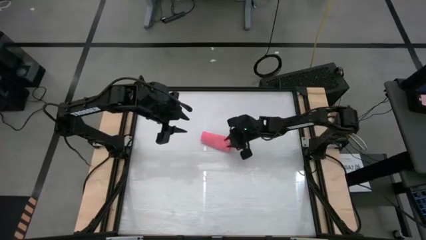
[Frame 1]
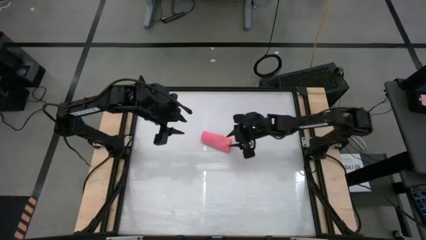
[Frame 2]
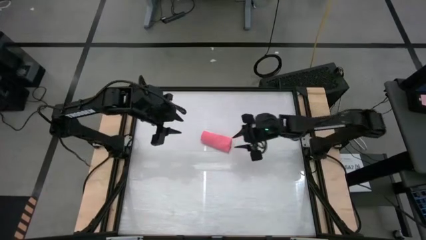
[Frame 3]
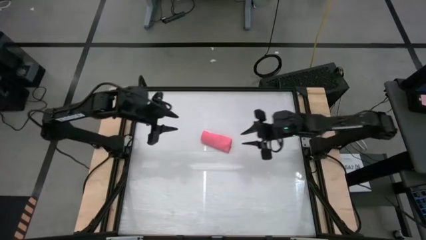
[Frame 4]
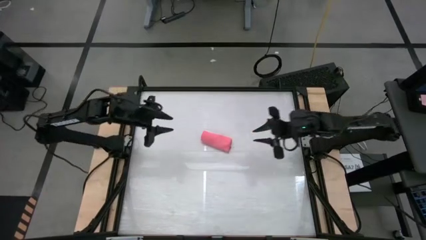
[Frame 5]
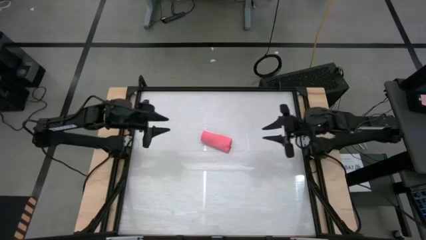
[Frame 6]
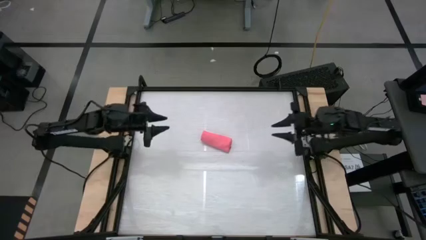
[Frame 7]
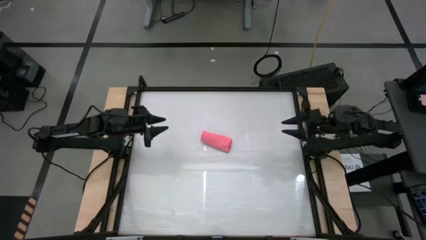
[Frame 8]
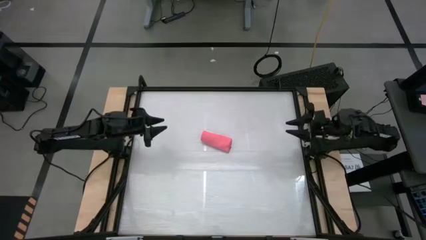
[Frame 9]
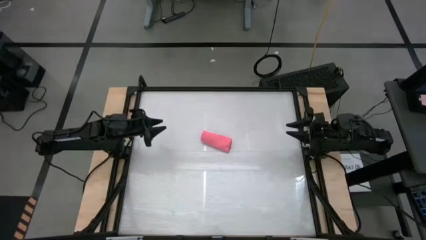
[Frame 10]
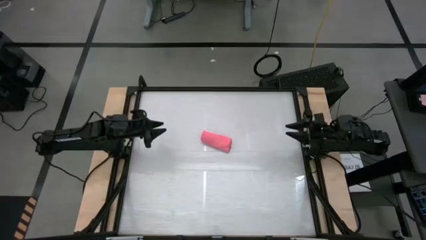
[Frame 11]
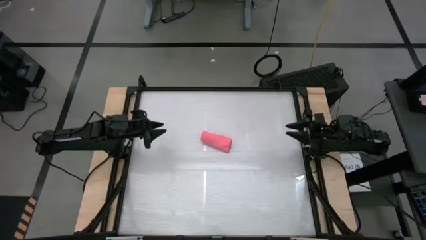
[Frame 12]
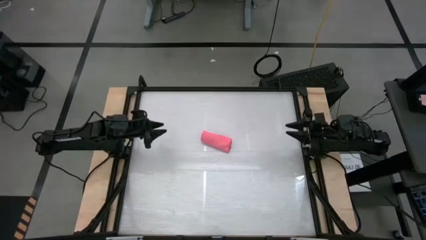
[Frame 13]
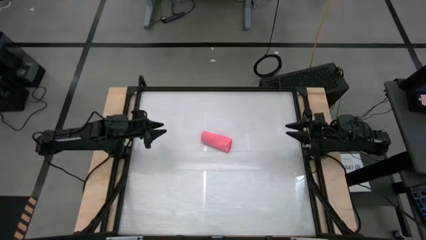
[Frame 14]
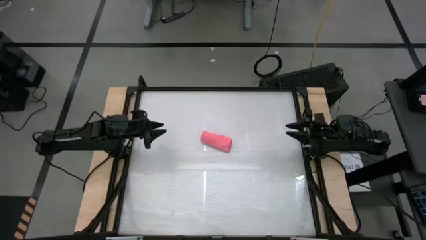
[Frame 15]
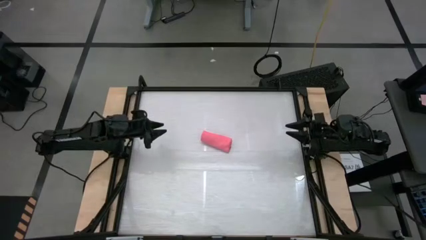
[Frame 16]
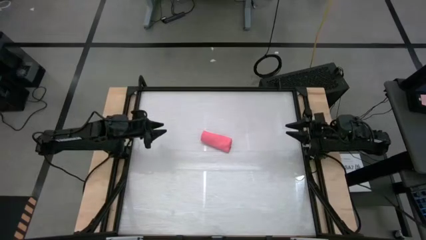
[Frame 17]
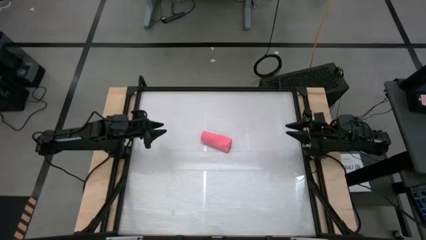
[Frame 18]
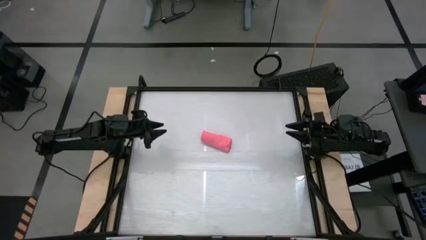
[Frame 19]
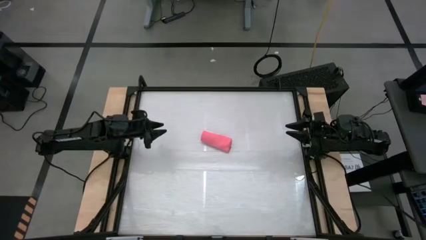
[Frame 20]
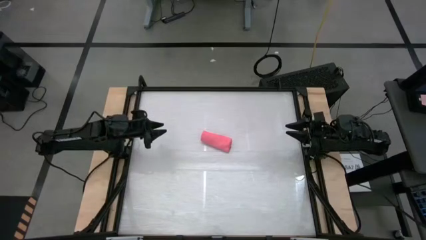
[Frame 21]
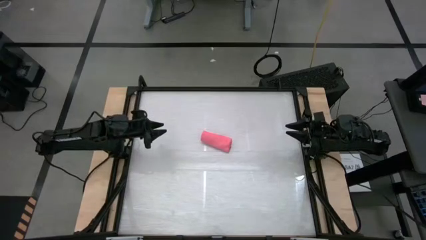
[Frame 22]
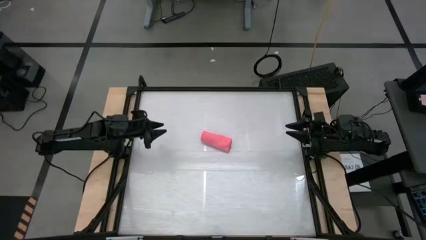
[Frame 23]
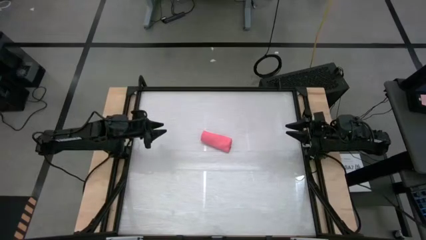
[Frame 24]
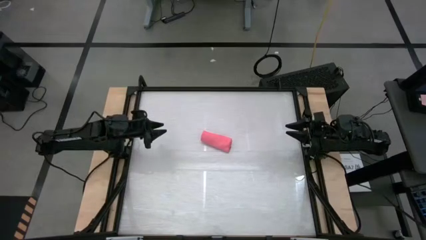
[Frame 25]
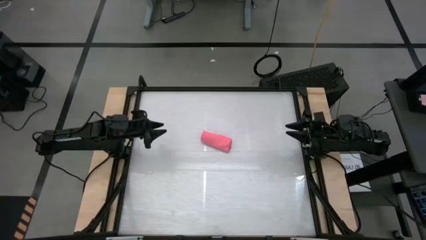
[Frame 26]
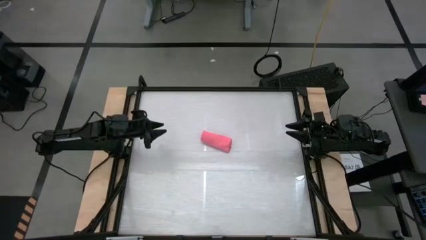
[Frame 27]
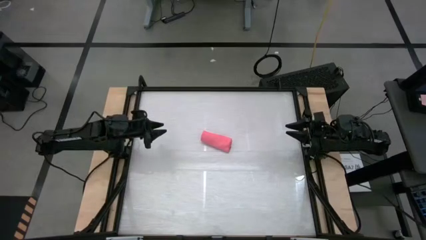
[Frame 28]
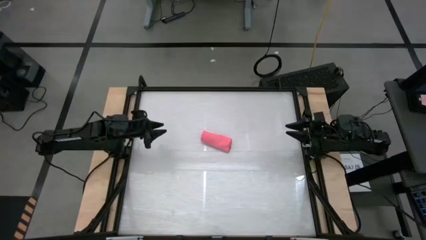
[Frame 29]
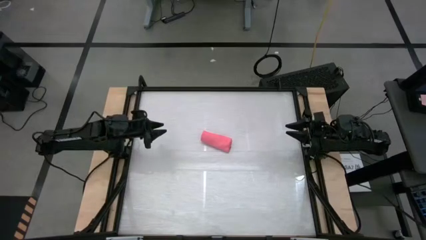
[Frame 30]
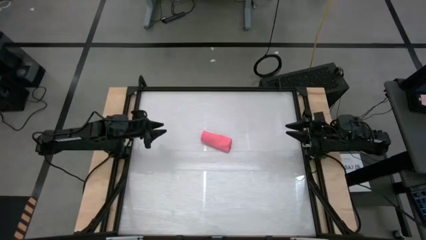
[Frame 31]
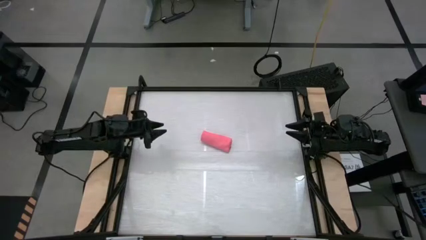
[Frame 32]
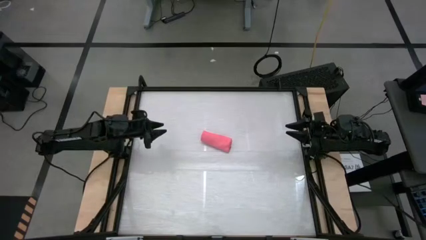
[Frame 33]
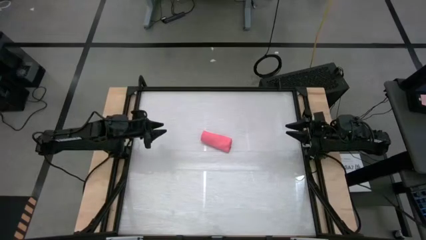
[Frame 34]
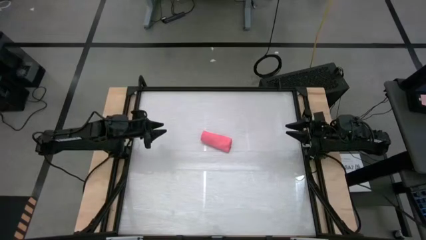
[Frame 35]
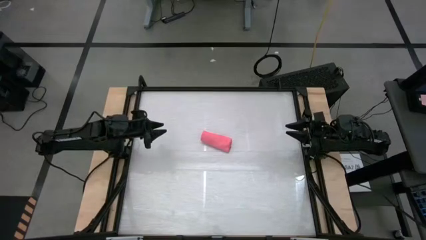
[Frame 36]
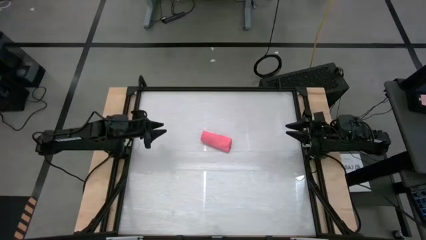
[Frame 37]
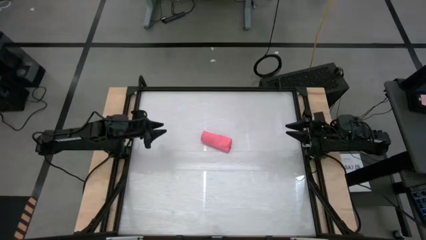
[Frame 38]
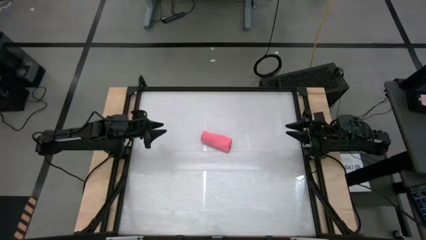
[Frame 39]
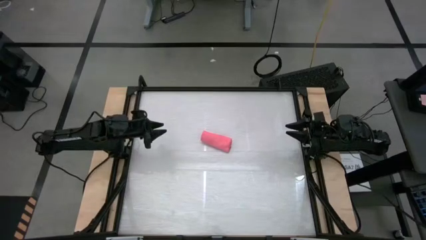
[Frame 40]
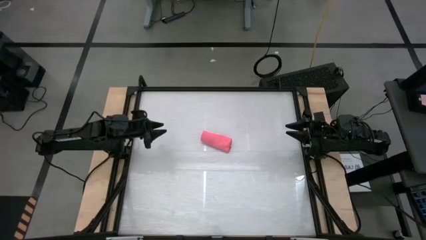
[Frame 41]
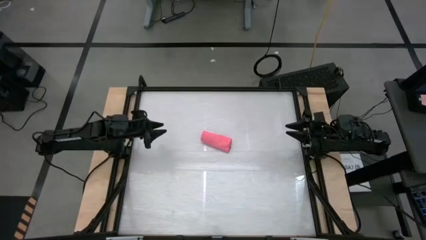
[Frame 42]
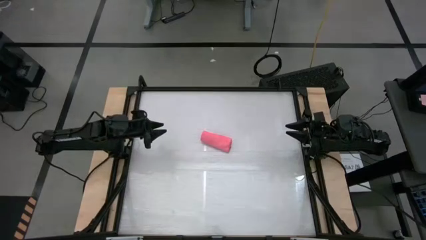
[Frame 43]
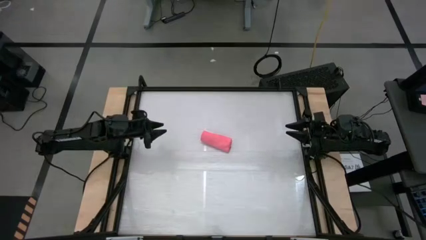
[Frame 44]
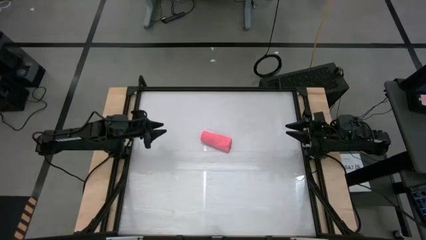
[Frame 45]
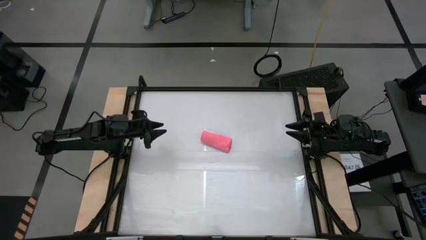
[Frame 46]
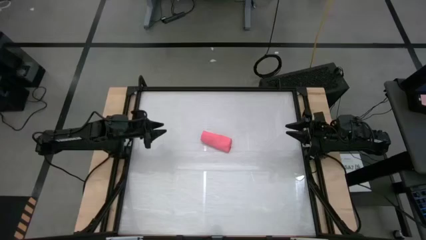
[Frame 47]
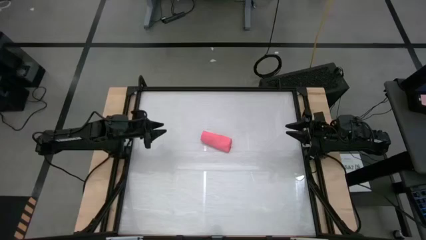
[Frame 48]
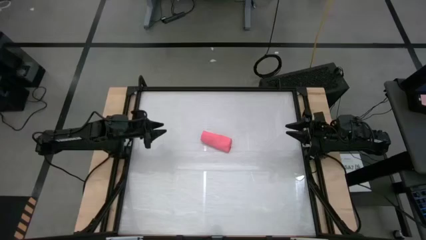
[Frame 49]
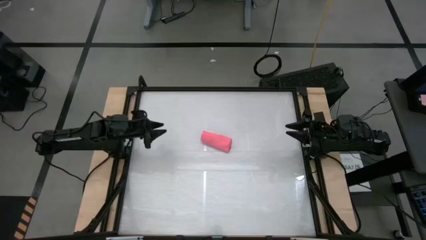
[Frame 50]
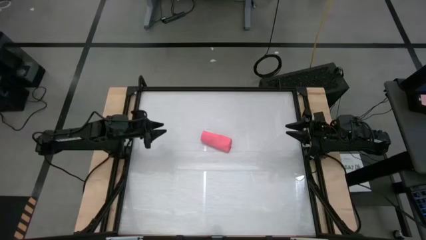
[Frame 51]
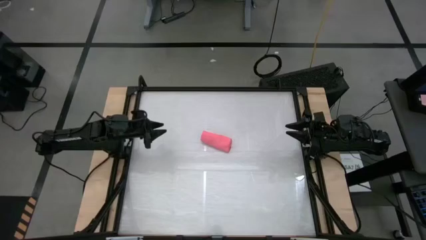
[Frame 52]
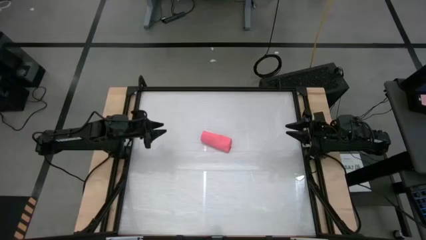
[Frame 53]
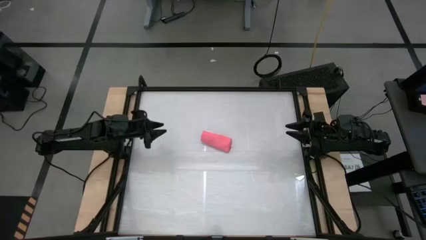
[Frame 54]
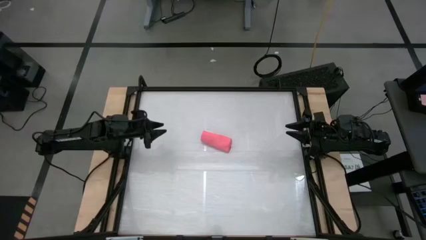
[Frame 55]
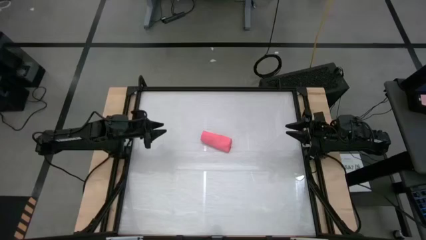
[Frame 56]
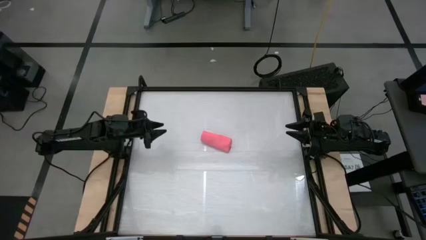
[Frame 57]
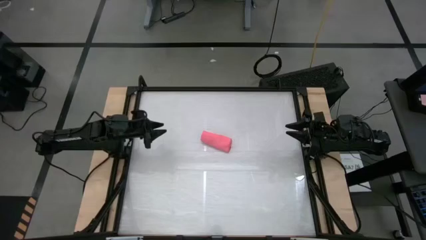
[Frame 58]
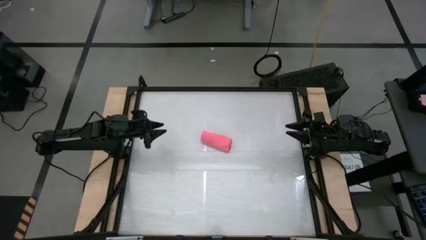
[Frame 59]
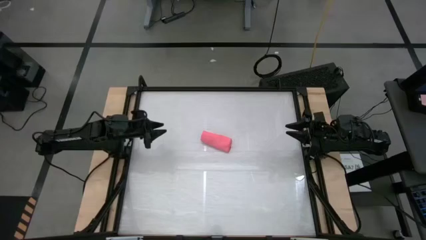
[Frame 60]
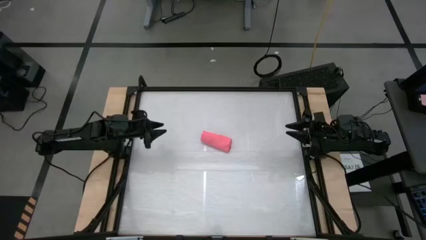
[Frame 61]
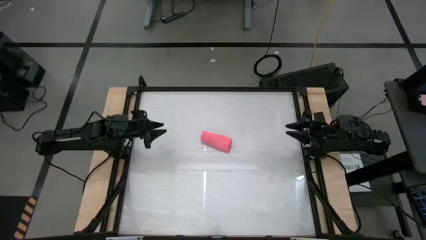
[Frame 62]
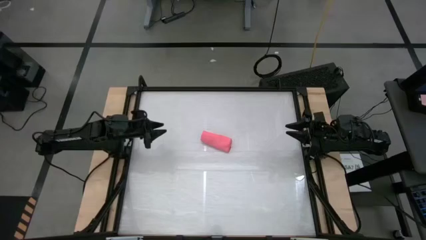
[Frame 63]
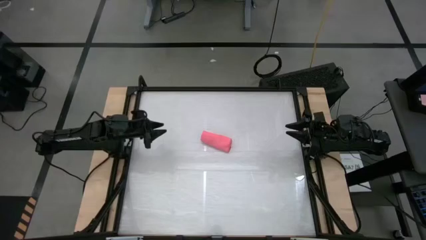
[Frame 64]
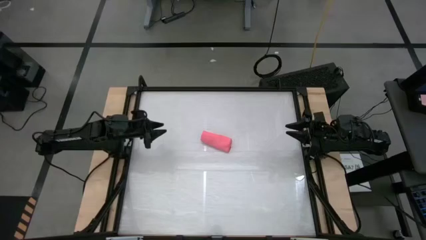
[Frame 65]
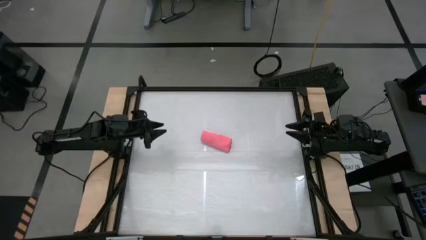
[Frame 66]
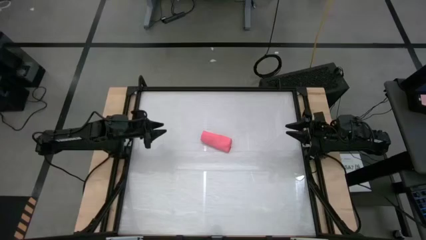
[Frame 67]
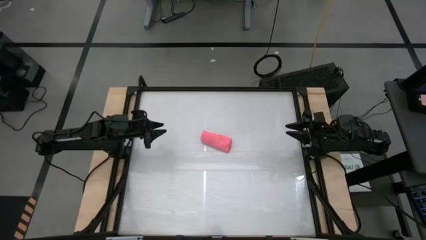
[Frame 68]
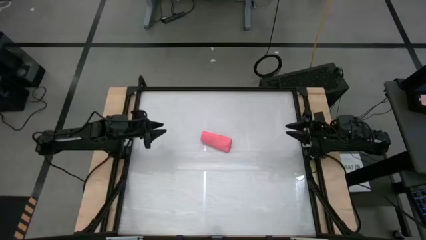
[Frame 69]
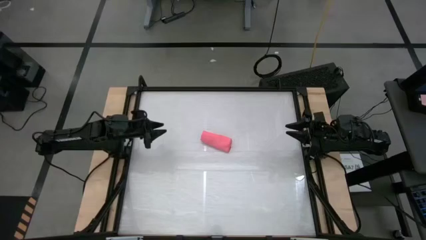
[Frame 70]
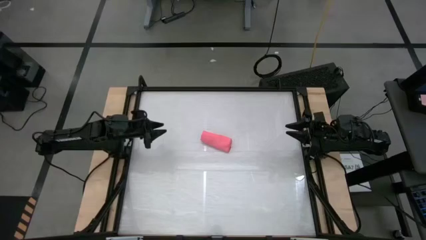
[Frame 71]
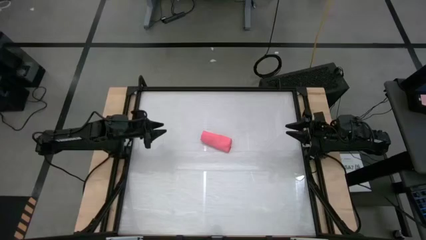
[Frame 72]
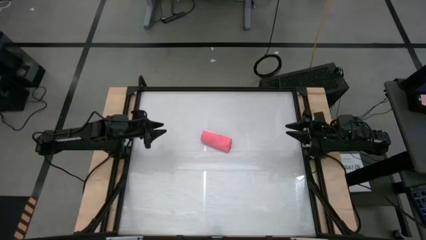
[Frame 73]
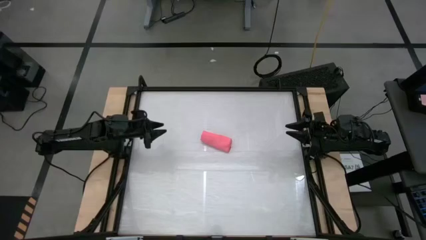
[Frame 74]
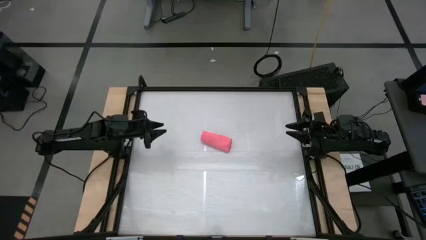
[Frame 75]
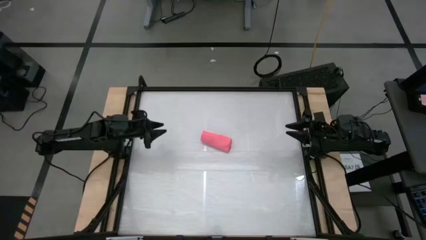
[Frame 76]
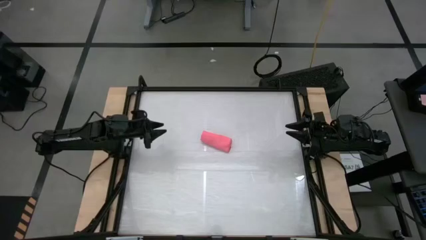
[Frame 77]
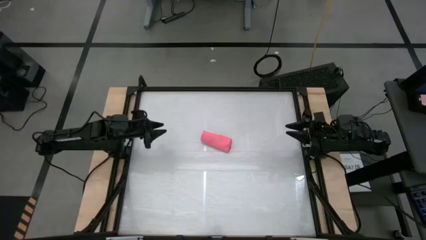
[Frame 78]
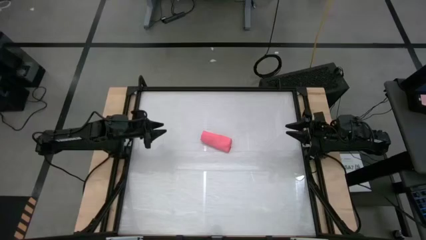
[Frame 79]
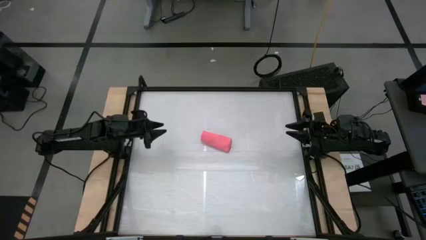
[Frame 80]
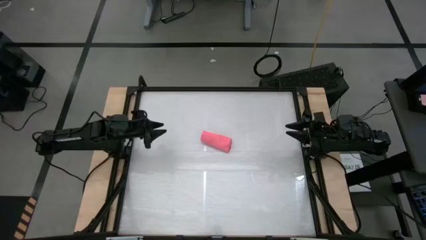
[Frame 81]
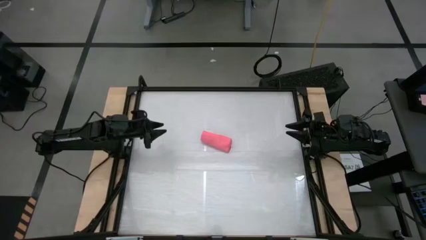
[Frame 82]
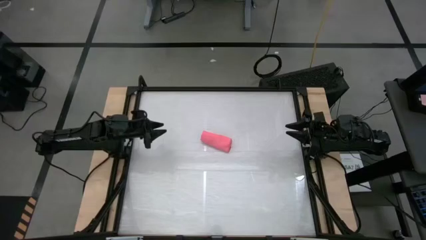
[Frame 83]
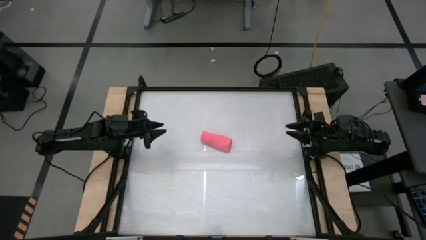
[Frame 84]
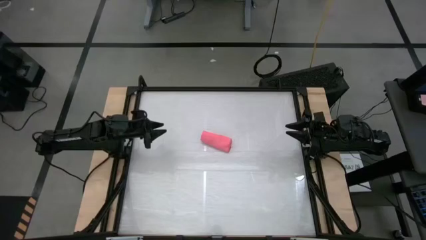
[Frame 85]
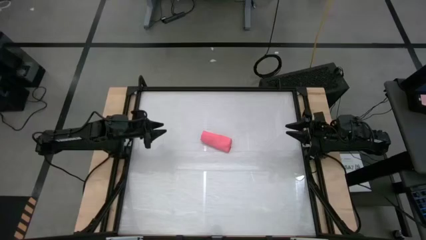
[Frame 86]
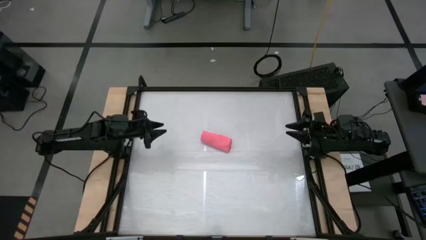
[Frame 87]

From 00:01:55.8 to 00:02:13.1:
Task: Roll towel
Return to Home Position
